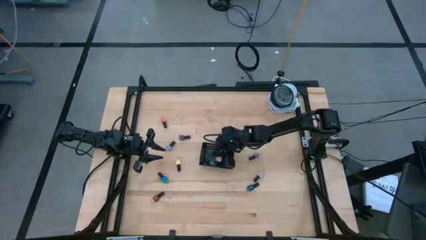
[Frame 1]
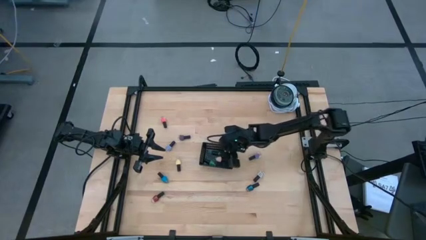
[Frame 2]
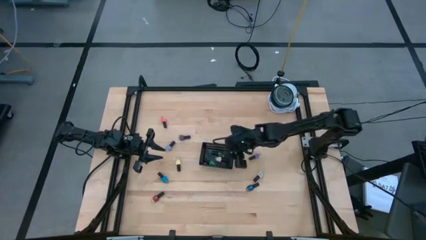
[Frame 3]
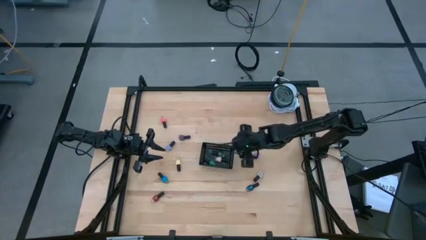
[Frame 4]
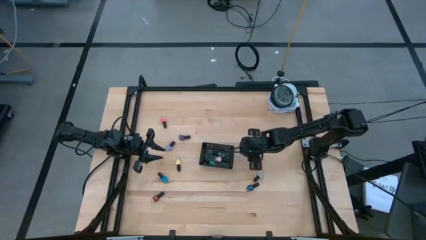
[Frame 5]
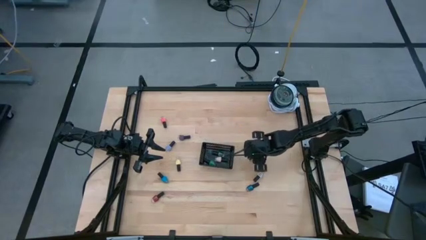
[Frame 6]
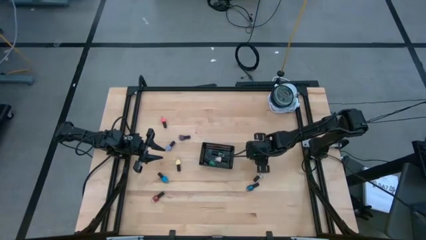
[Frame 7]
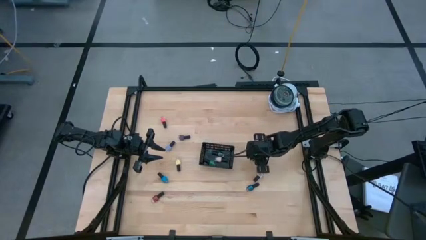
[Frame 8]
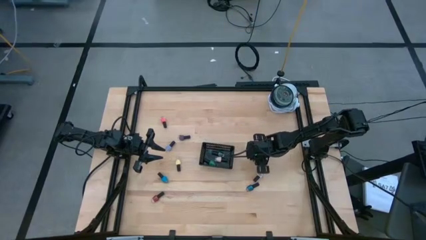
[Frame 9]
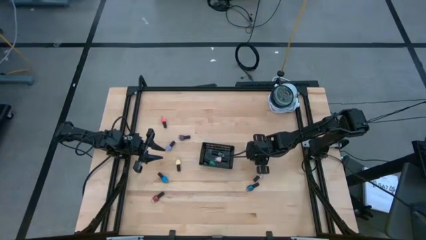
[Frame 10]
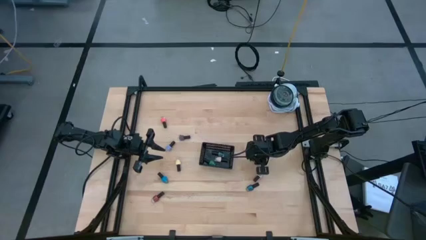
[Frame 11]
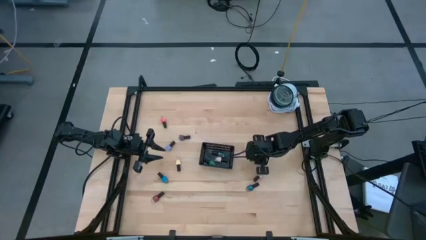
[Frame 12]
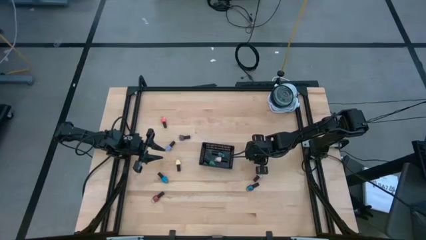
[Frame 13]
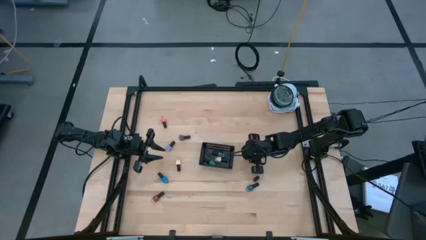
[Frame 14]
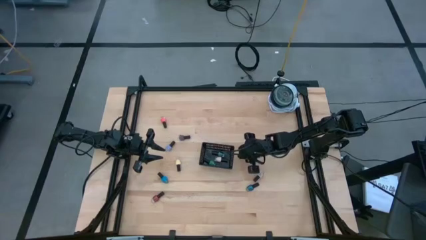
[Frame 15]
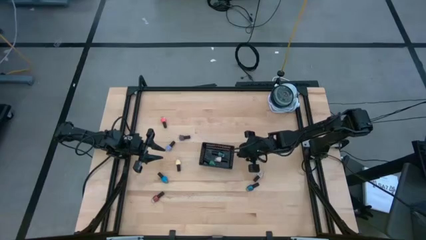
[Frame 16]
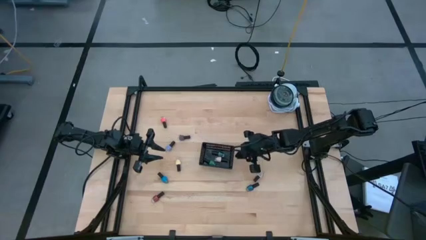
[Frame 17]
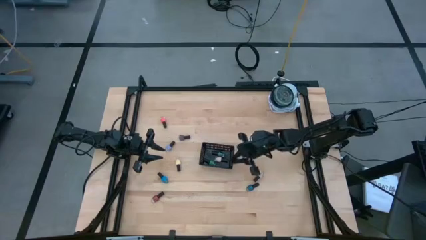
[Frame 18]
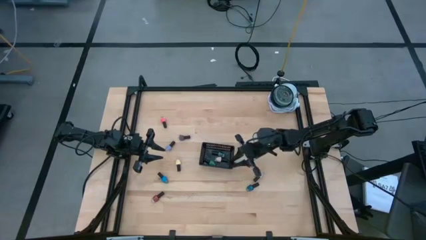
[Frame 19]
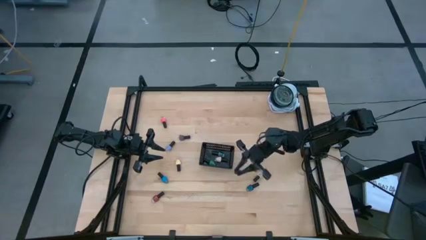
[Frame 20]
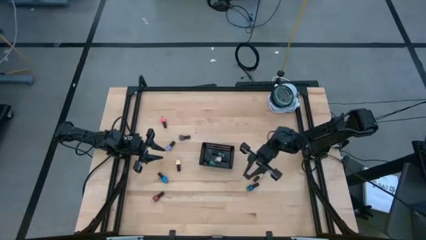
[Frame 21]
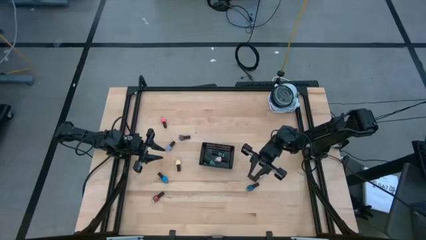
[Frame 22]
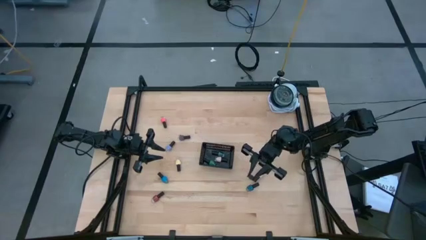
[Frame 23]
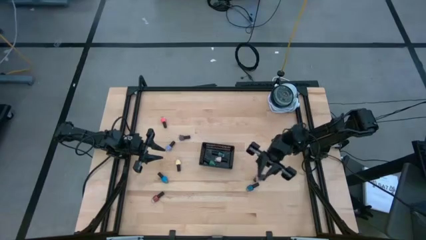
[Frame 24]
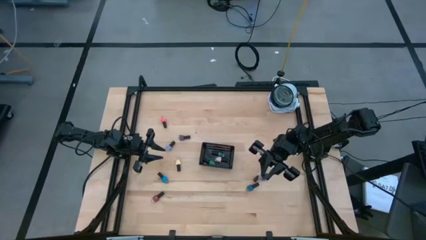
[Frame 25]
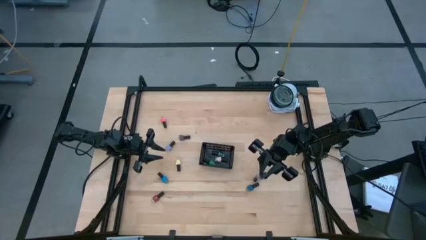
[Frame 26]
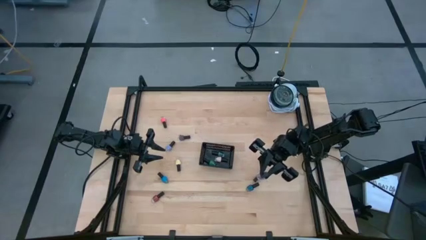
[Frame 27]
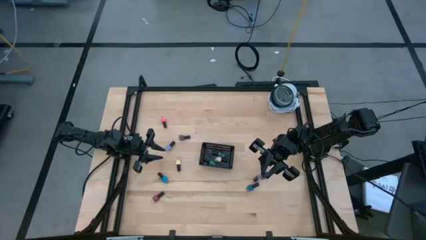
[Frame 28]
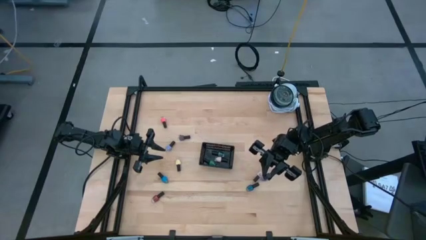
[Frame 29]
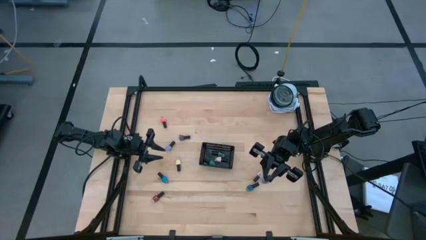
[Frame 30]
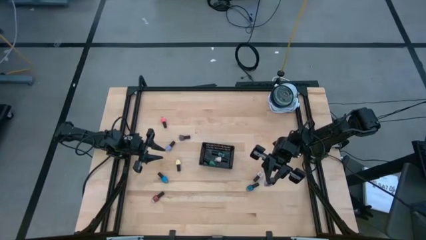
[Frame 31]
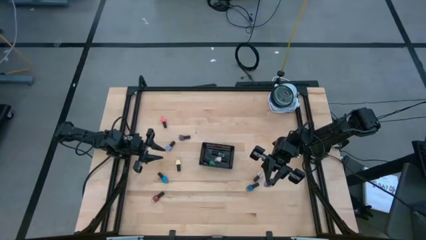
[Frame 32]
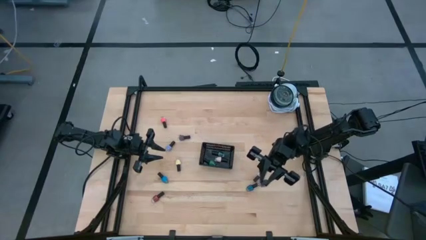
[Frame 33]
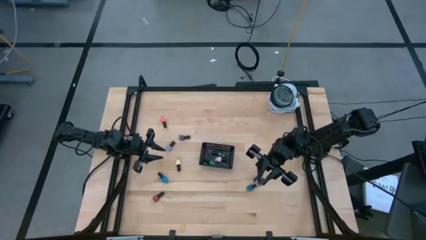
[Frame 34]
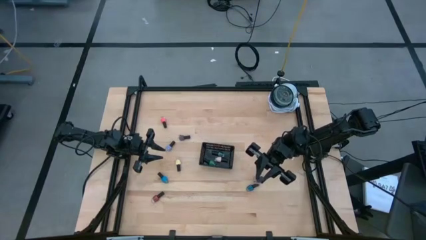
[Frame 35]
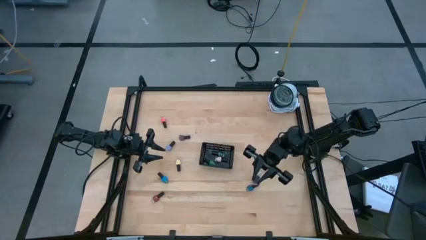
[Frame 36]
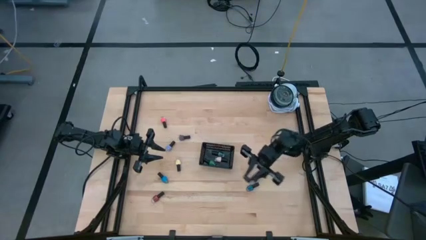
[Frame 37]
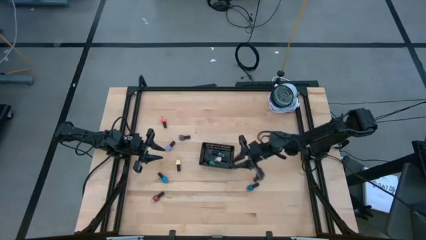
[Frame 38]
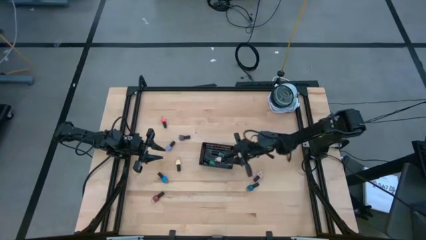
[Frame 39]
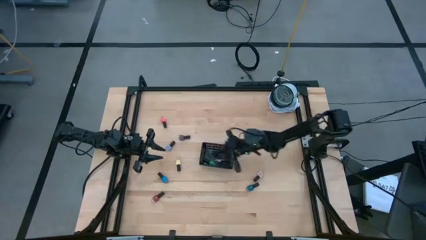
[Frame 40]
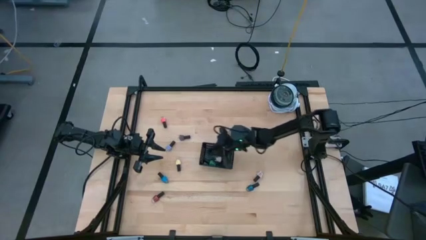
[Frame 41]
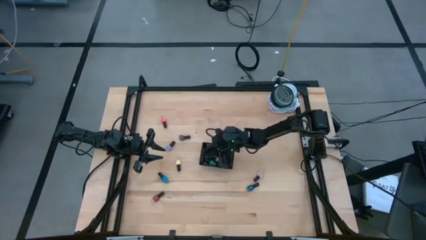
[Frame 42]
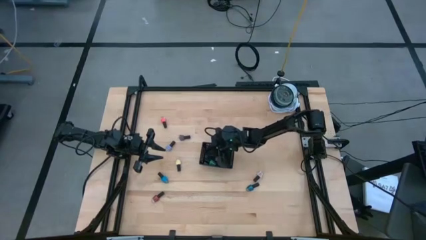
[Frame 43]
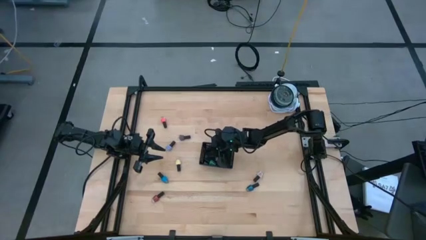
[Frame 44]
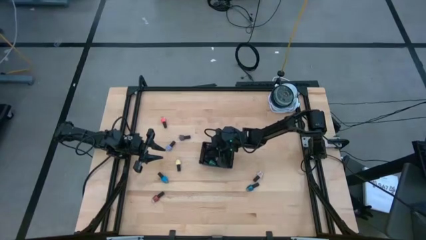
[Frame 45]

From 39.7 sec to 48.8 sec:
Task: Pick & Place Nail Polish
Put the right purple nail polish into the black bin

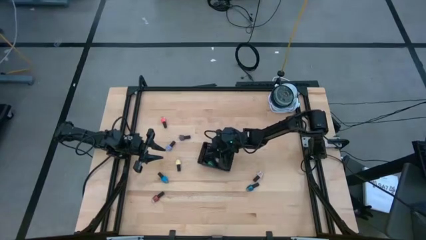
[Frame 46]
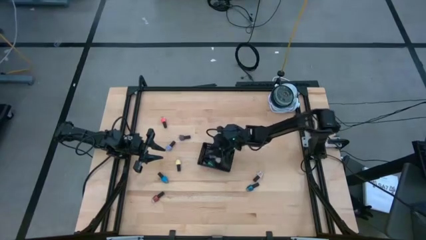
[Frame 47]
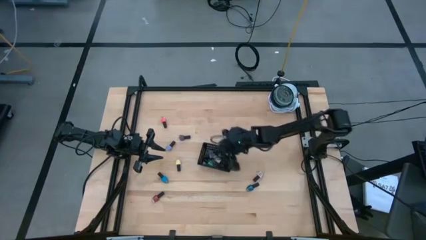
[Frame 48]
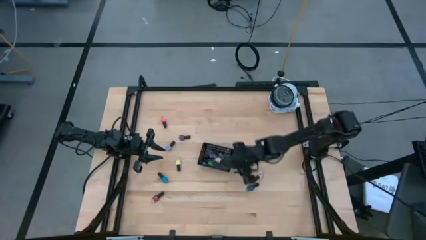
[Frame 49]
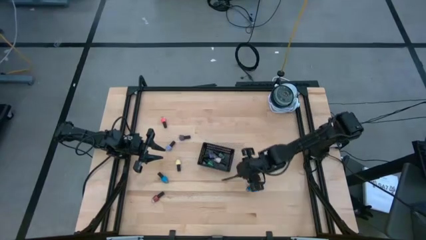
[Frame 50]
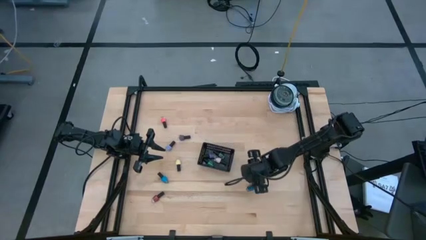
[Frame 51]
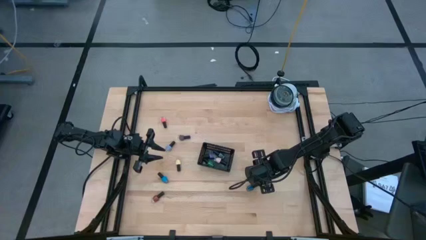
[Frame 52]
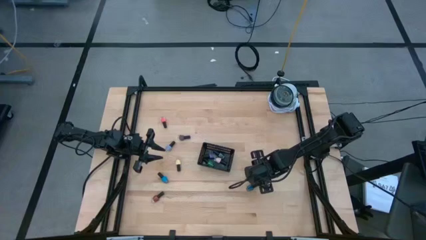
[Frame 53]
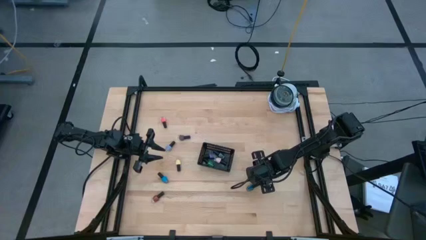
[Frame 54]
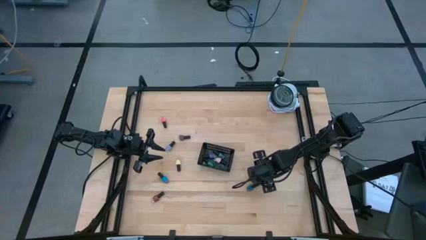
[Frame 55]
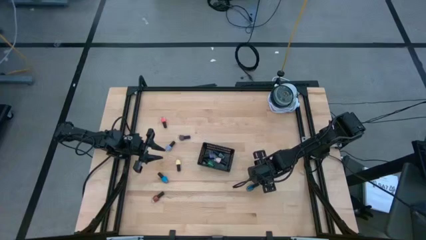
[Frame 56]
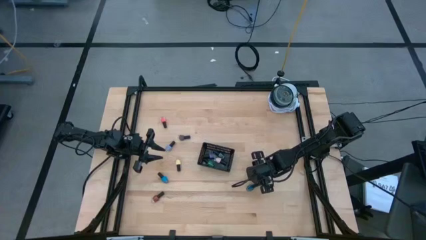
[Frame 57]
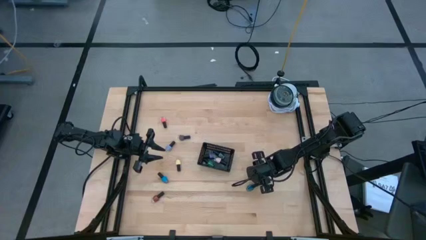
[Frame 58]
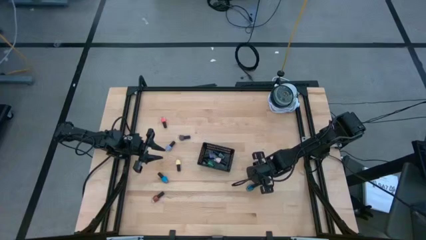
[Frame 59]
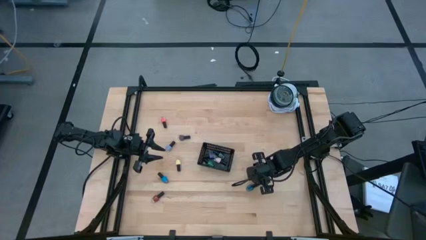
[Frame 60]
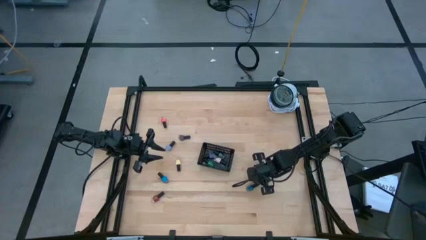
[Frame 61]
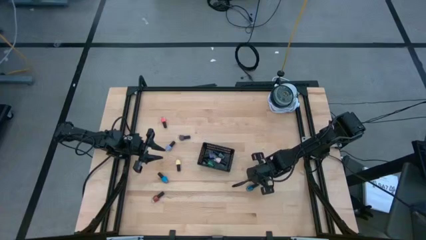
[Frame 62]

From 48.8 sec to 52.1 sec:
Put the white nail polish into the black bin

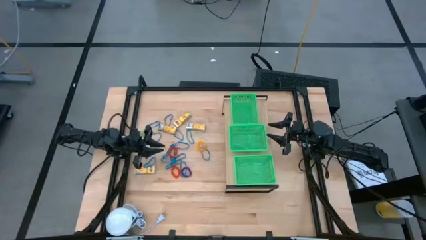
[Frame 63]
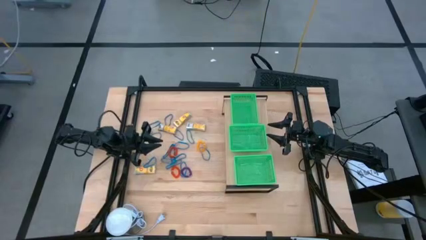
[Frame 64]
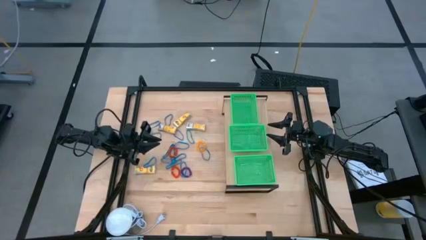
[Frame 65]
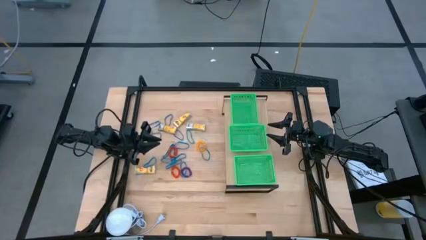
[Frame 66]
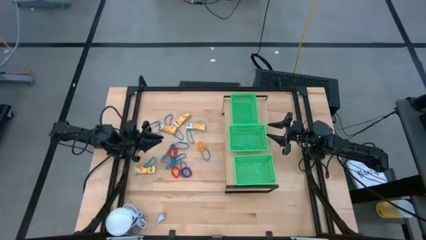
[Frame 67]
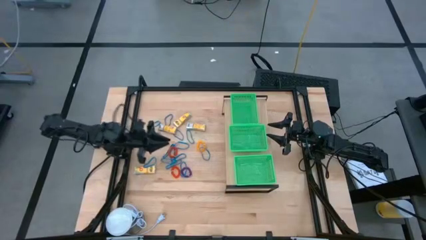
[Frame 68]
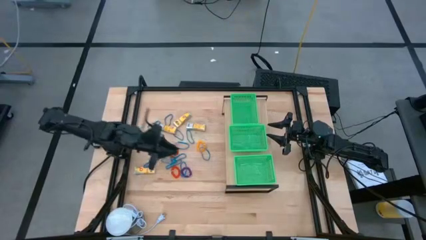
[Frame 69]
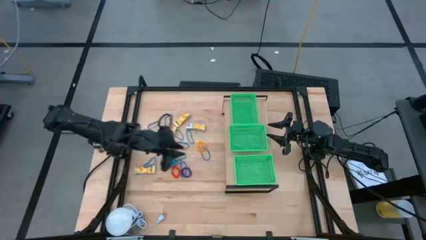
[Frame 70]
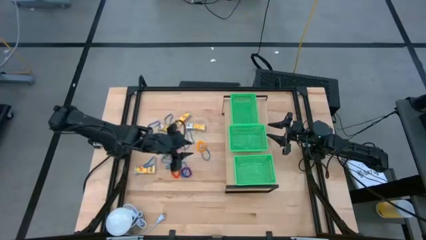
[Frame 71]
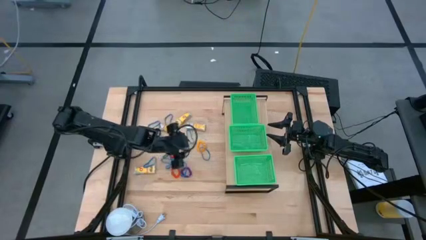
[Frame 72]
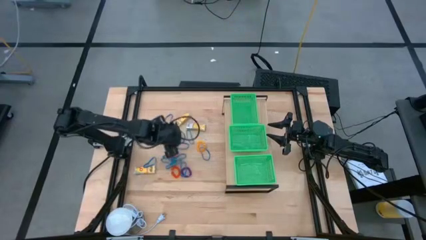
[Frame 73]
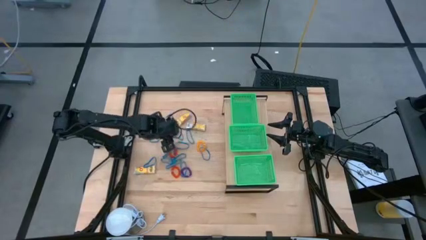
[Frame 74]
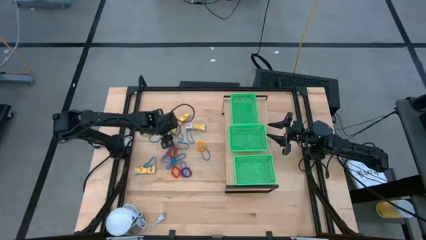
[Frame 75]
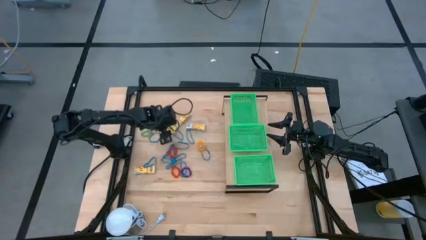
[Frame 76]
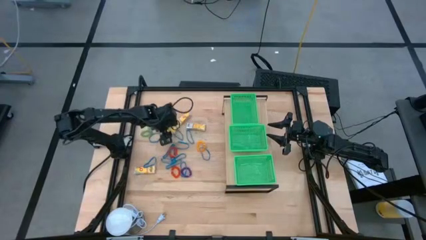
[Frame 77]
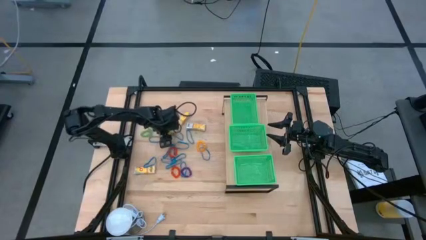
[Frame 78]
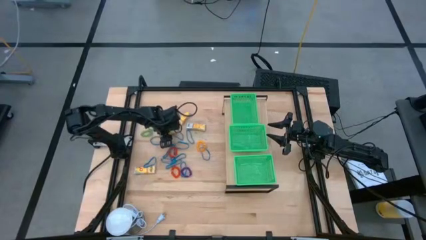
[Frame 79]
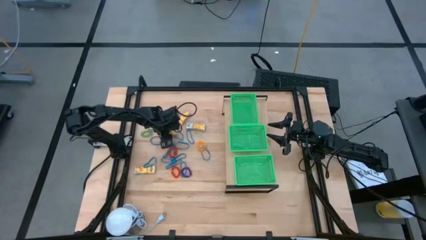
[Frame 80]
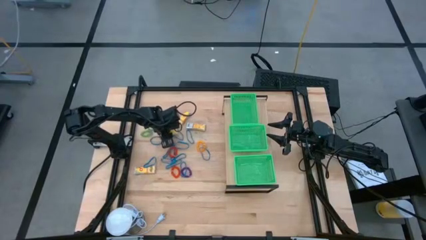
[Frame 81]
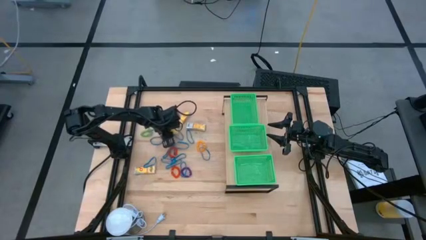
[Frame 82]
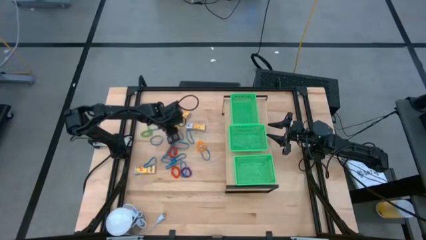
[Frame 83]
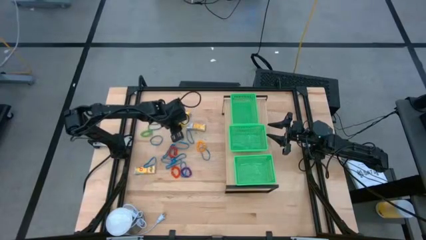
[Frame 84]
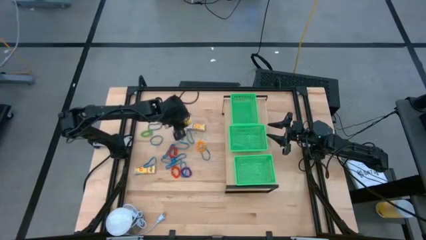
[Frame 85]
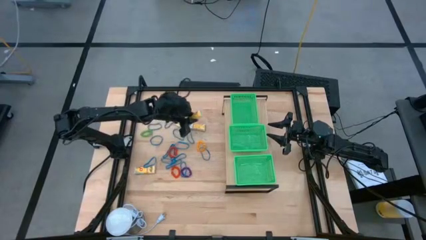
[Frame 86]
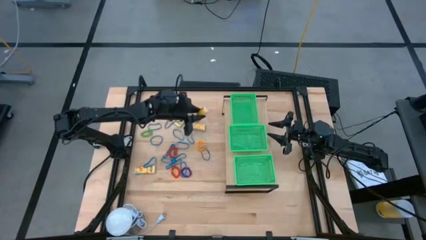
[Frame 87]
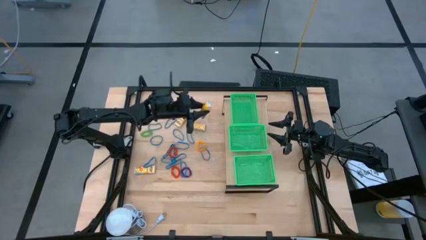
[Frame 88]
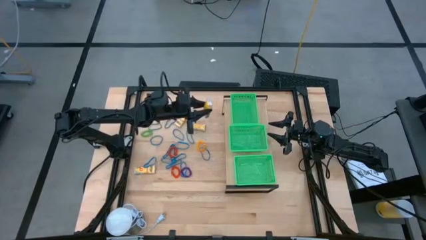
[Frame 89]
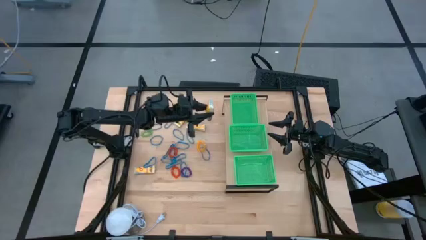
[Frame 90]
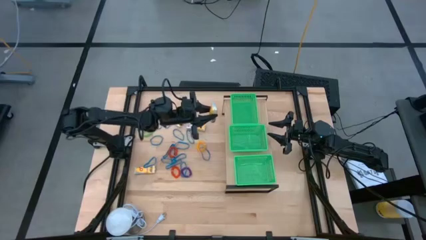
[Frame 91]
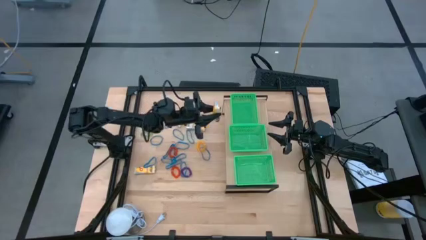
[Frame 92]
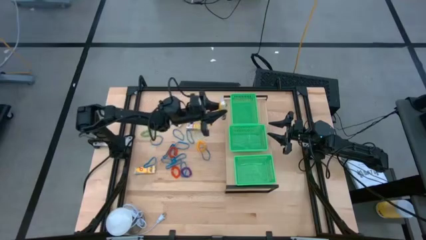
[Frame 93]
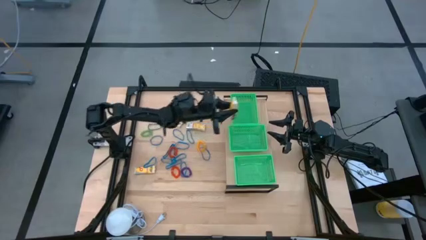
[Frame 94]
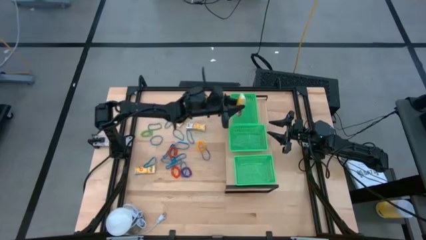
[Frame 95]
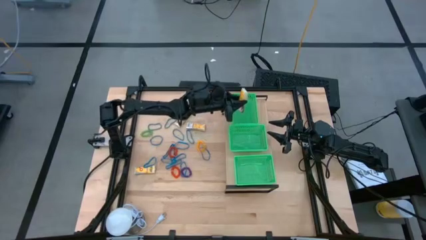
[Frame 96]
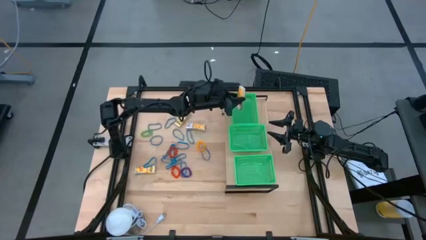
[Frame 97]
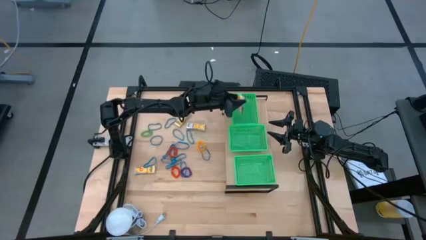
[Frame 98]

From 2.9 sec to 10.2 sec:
Task: Pick & Place Office Desk Supplies
Put the yellow crayon box into the top green bin
